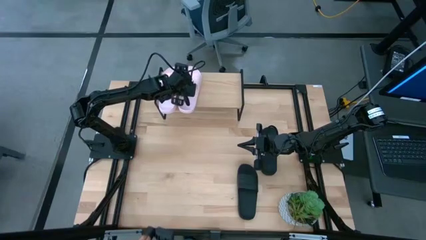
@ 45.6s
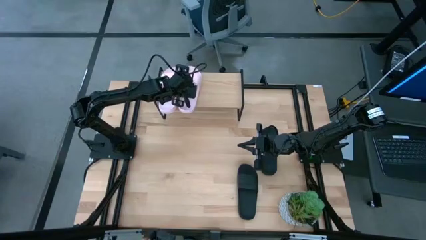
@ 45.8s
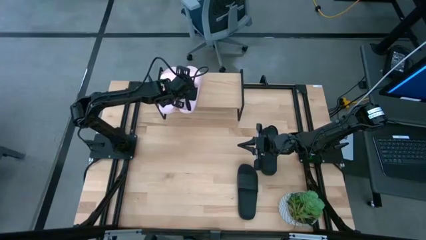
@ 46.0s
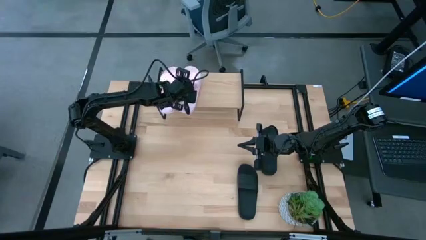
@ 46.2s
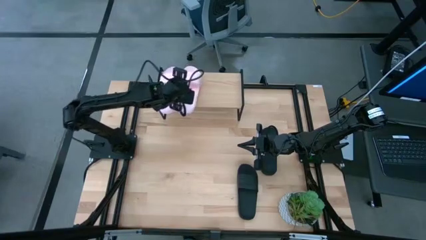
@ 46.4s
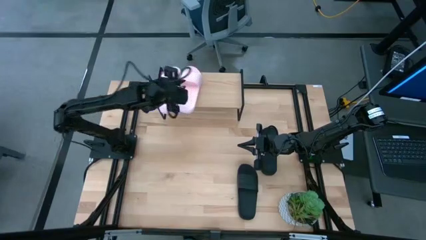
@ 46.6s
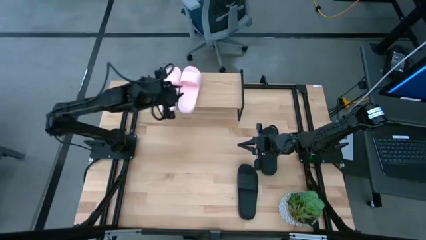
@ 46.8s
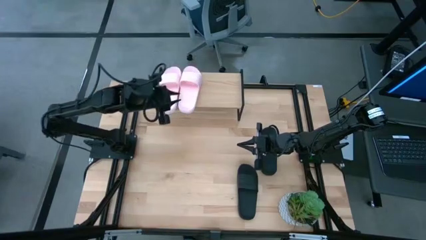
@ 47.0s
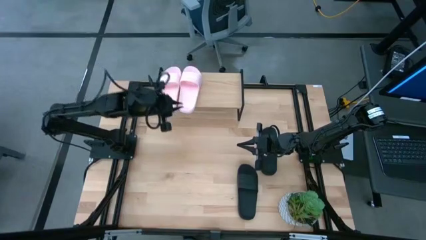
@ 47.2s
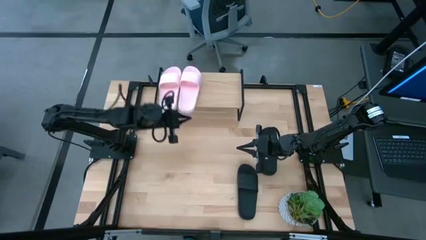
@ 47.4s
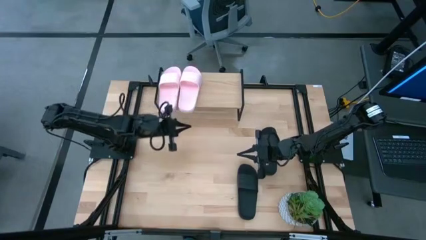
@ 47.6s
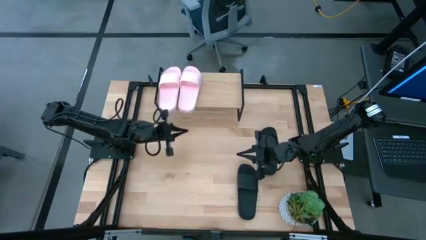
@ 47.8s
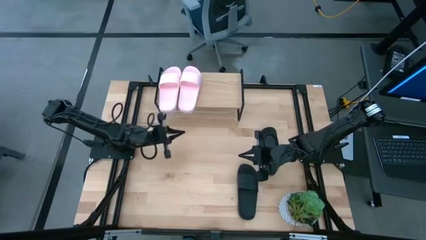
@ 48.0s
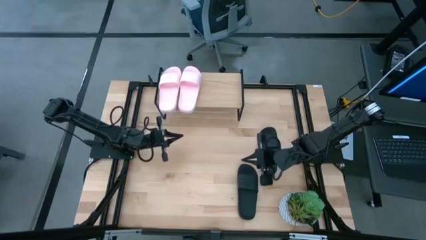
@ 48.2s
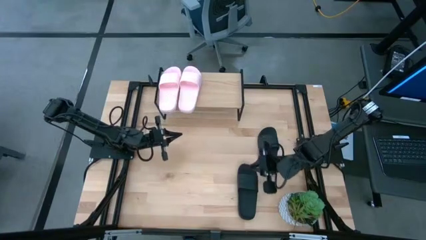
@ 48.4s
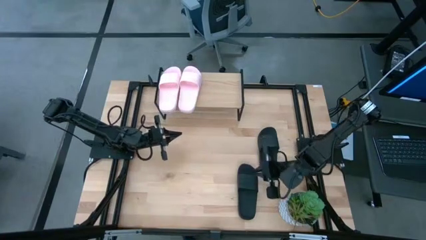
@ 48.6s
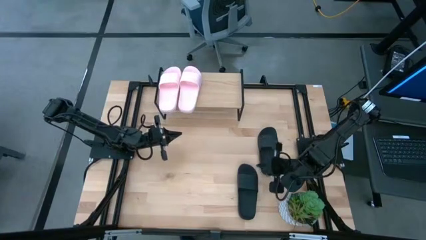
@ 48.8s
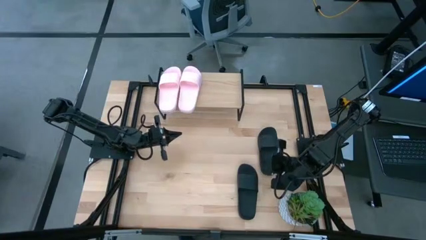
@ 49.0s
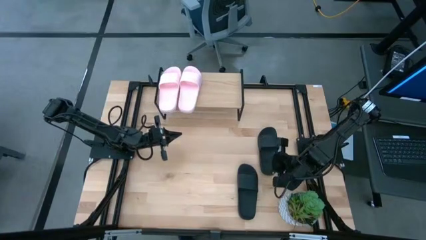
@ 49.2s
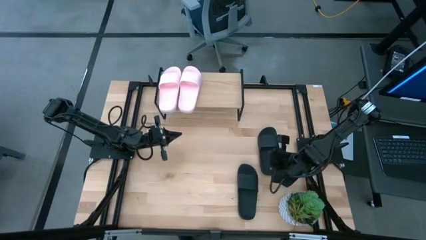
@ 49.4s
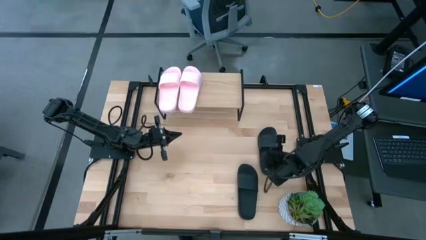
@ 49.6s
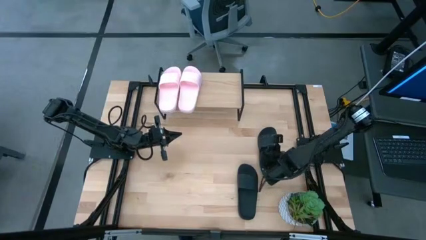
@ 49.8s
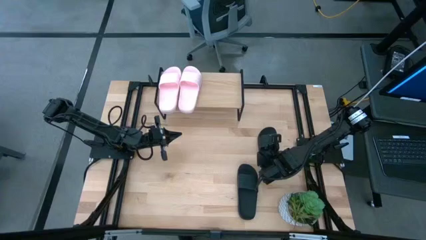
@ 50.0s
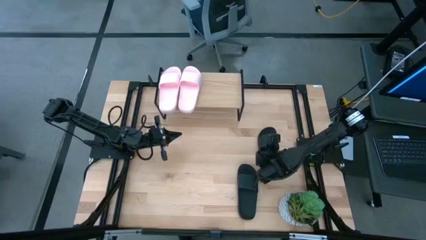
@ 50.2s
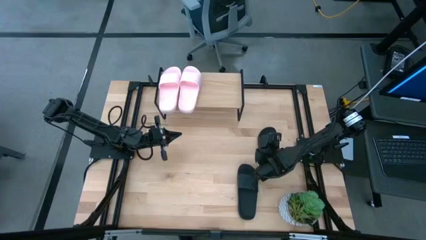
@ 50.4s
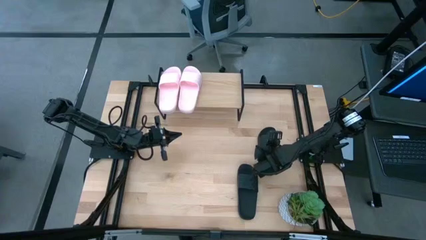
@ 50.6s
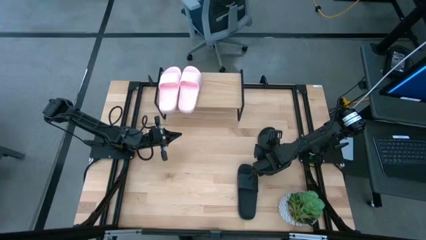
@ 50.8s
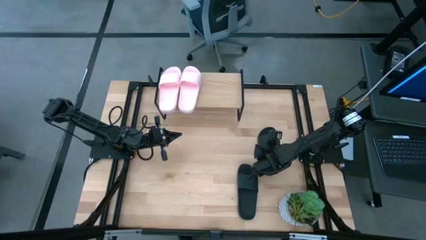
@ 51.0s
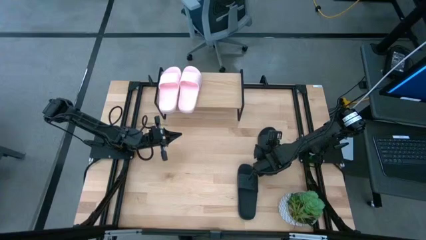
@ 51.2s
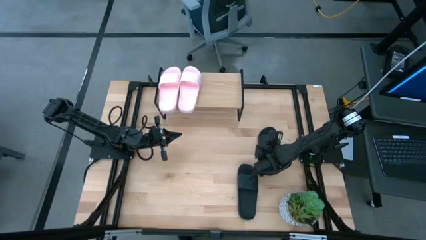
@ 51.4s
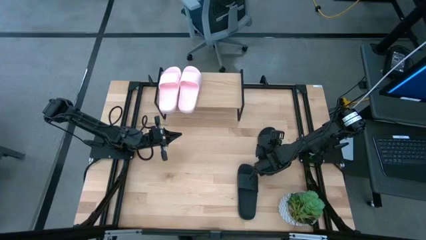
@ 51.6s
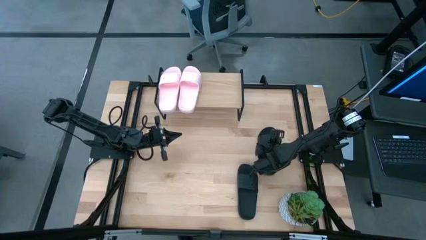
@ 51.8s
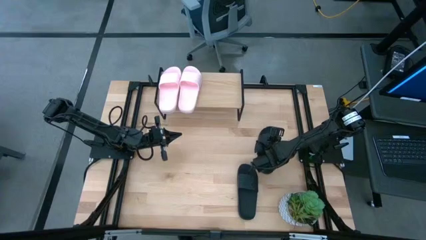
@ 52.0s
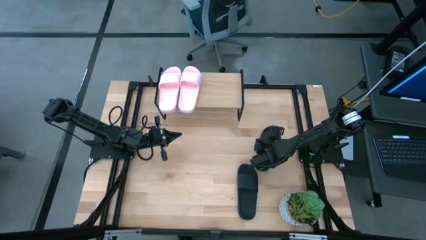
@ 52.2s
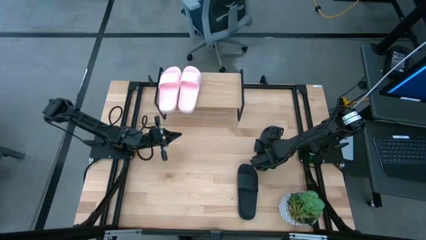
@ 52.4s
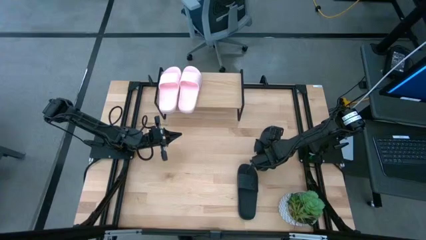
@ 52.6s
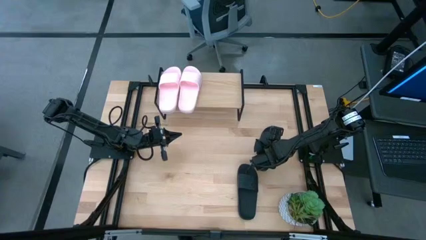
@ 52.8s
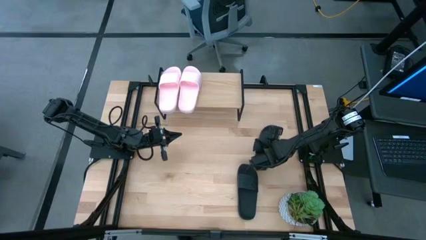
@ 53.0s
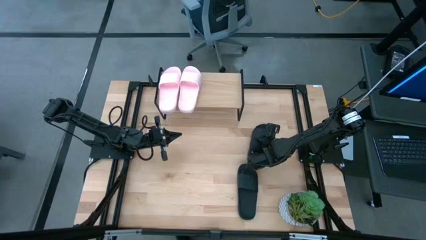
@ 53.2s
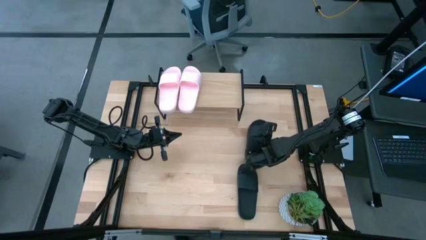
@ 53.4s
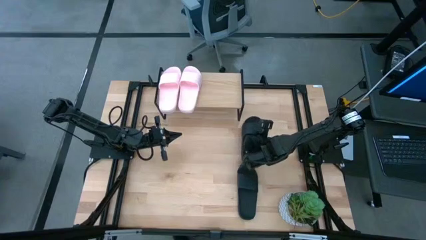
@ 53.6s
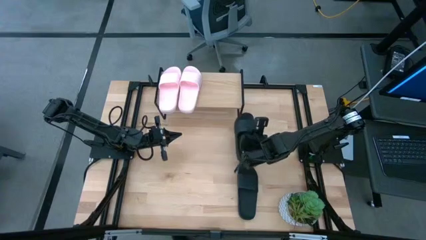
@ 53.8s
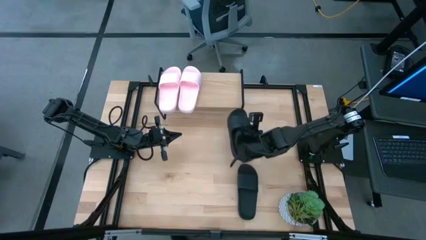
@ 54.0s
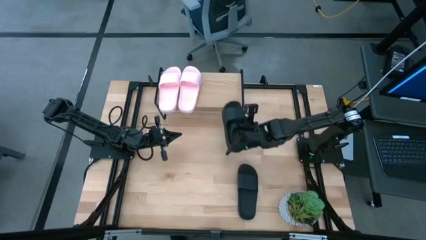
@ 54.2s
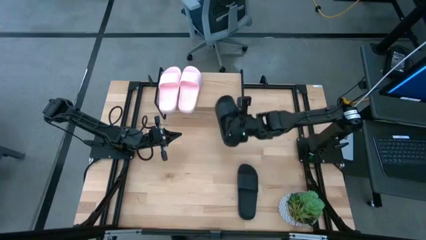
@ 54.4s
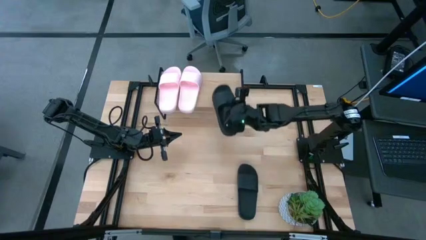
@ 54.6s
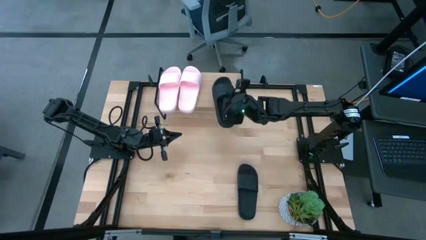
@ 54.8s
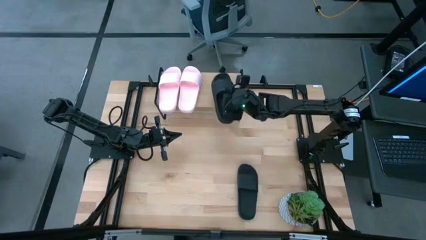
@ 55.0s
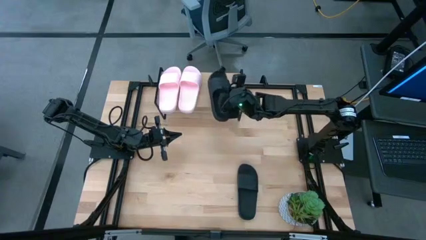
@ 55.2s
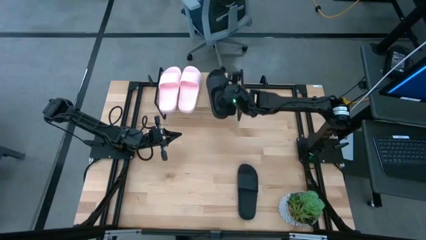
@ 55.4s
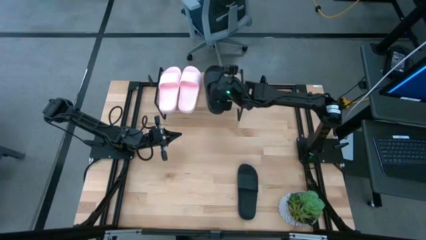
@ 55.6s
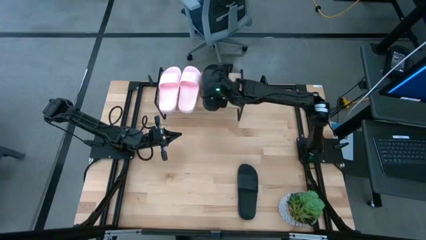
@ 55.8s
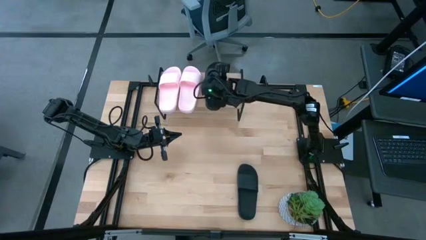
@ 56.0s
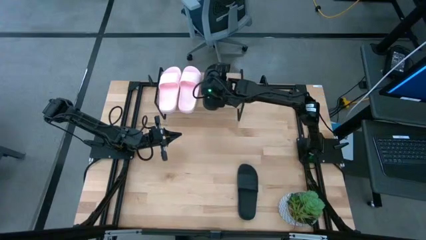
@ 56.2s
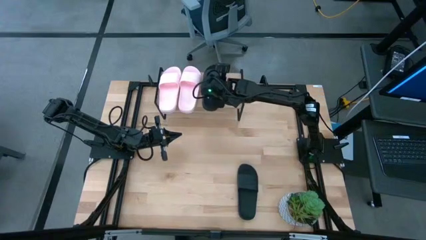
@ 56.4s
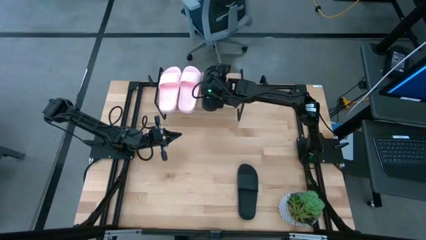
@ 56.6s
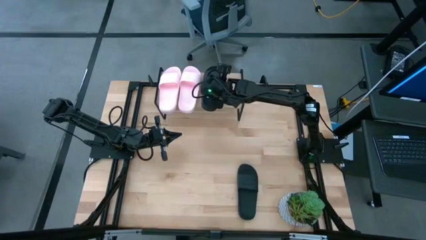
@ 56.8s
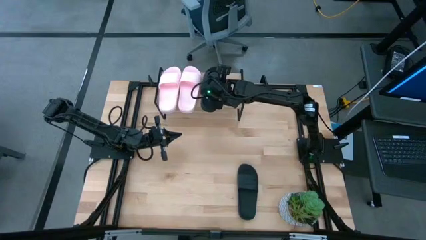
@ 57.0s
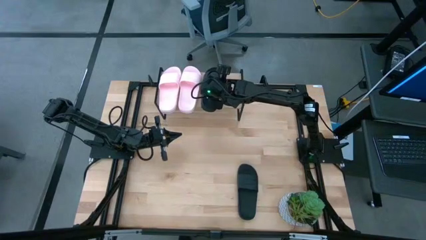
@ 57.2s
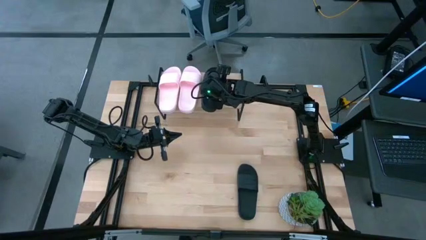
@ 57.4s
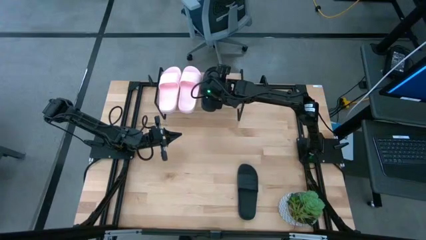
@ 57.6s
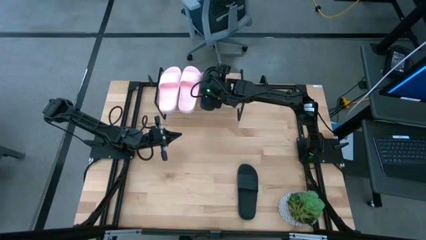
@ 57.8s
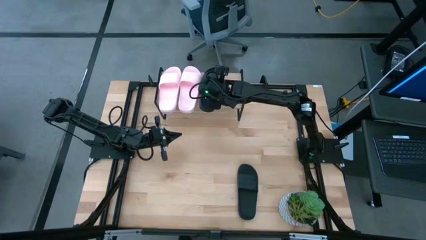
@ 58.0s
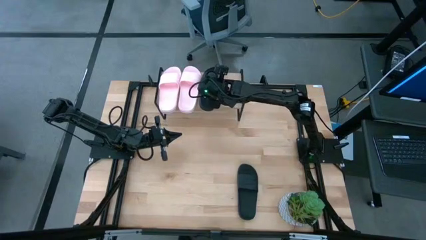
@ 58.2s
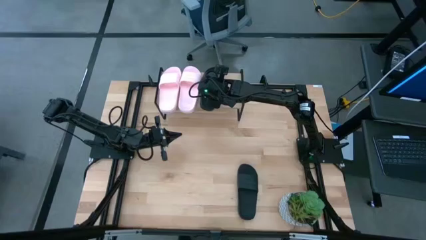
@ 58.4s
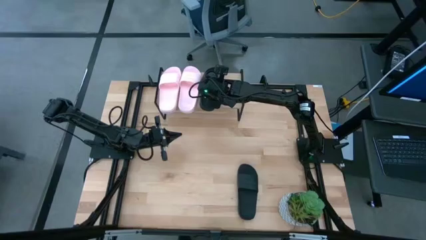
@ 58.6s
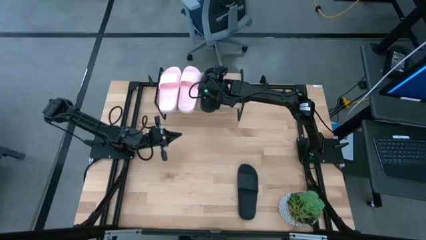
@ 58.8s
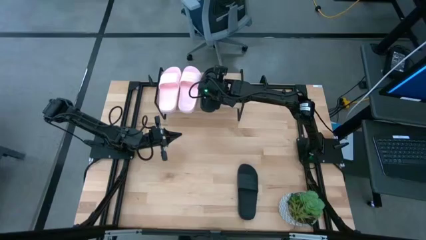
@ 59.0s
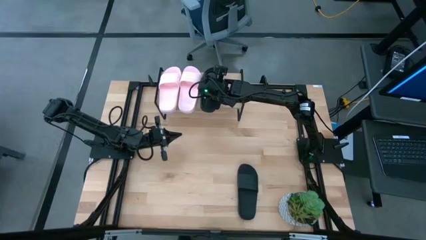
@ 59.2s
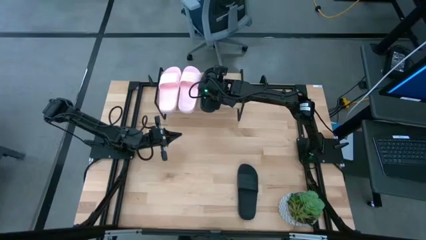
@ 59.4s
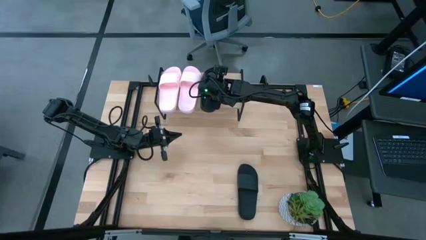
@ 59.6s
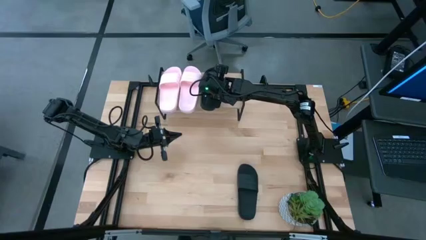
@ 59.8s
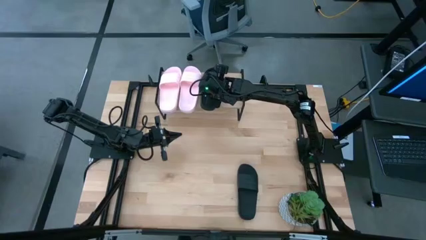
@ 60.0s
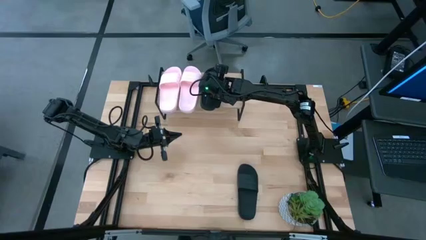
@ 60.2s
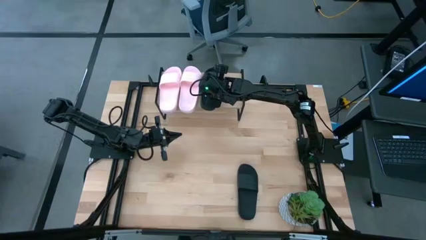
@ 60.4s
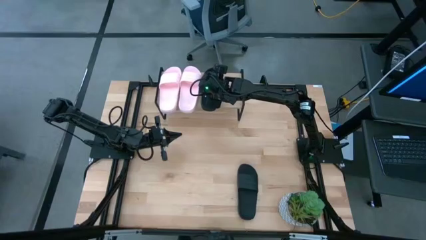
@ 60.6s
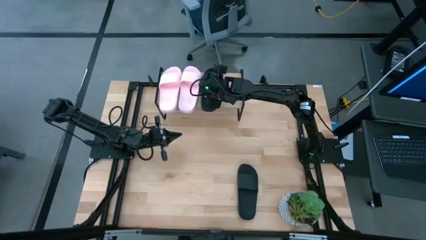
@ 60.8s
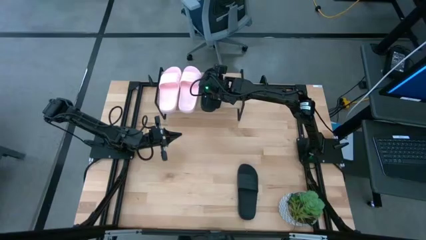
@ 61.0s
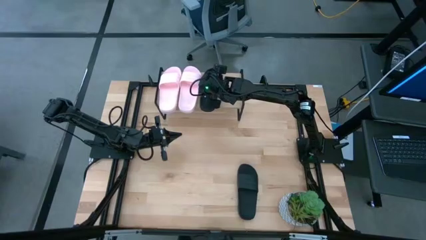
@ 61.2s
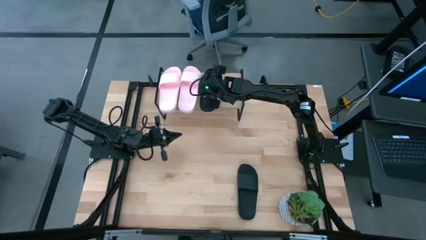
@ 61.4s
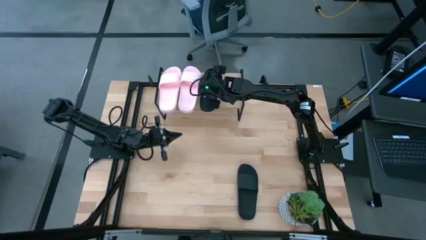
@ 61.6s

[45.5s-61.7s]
Task: Pick and place slides into the shelf
Put the top black slipper on the shelf
